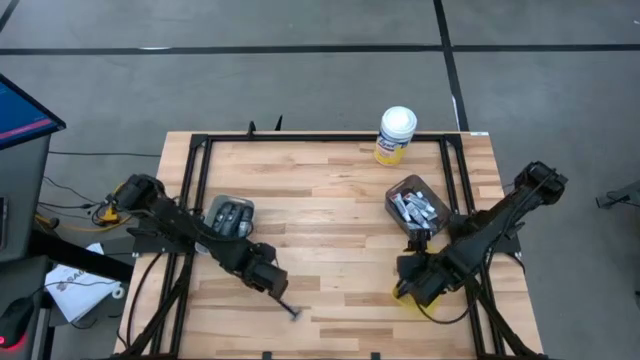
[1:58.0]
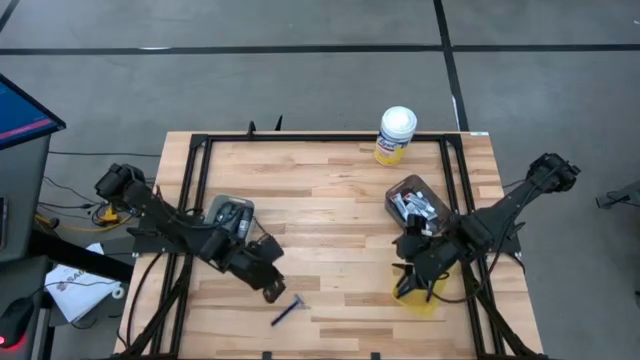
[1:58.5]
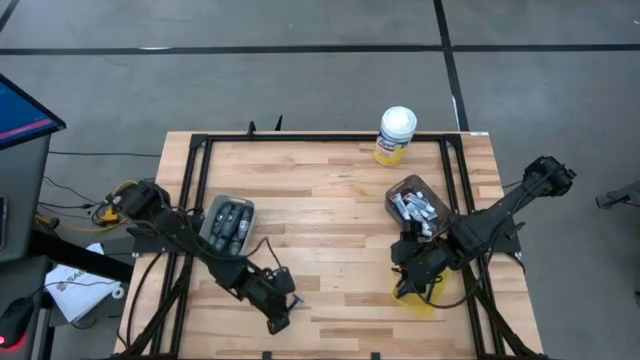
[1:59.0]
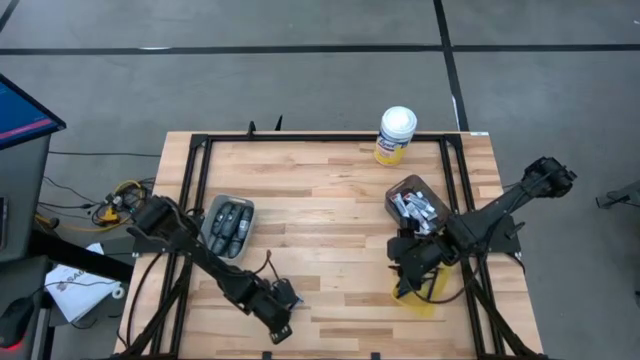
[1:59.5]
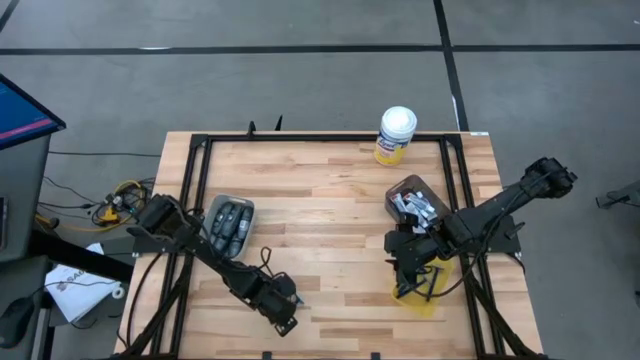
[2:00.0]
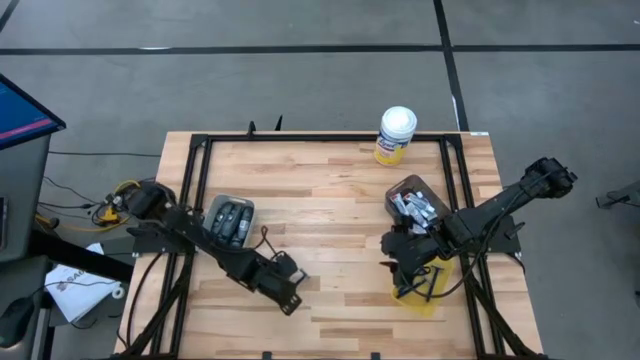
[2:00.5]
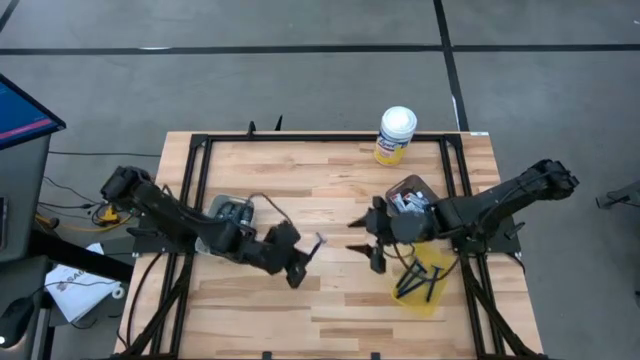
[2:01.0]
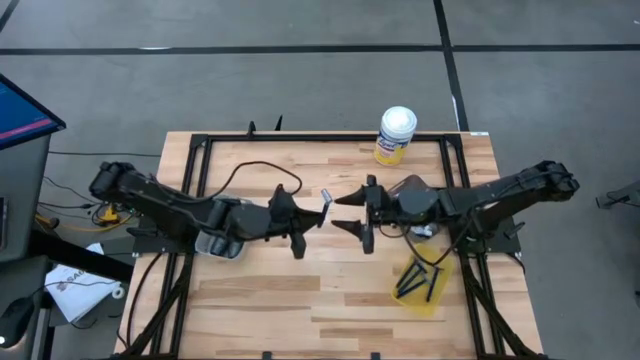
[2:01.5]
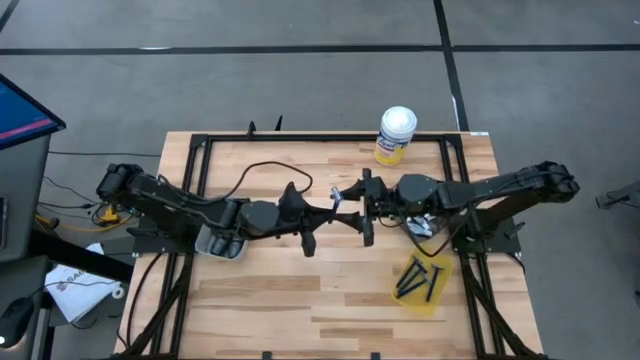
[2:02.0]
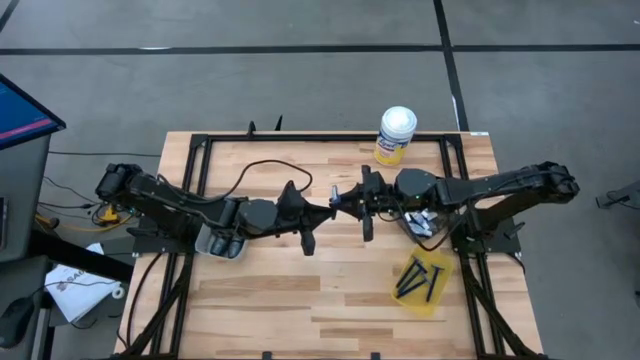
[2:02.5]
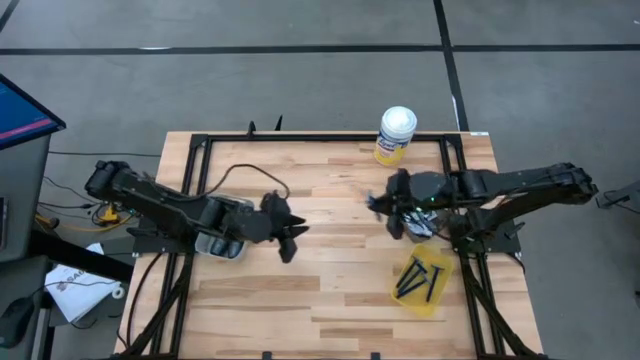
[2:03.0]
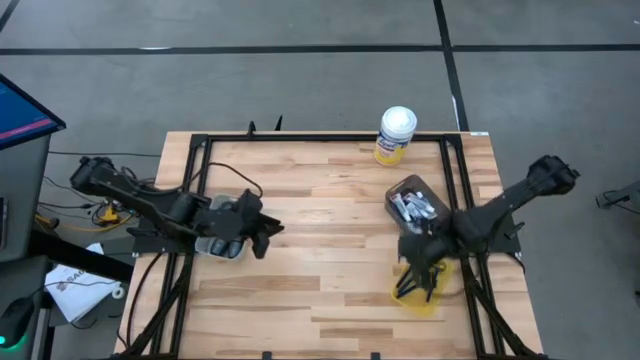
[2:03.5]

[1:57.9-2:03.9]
Task: Pick & Place Travel size toiletries
Put the blue razor into the yellow bin

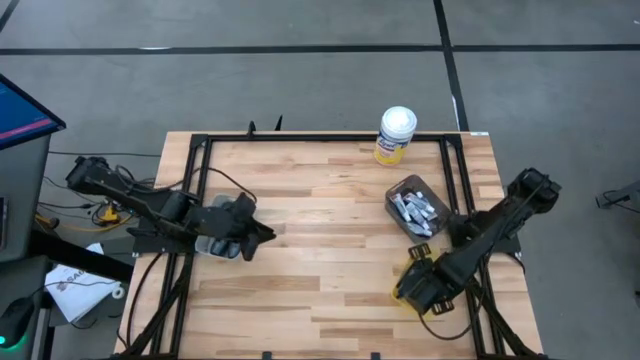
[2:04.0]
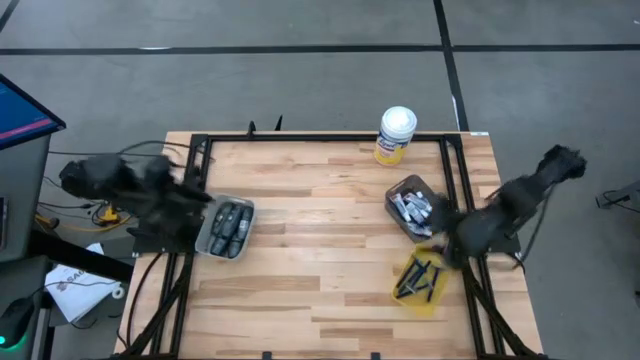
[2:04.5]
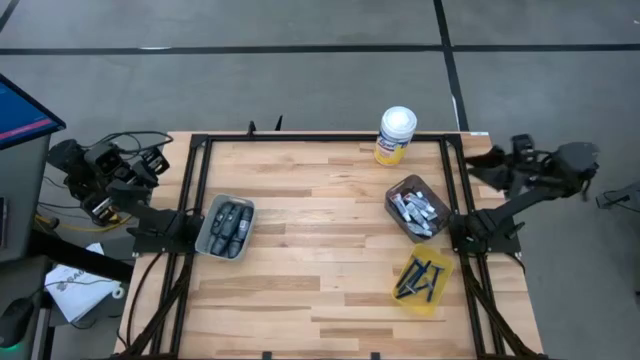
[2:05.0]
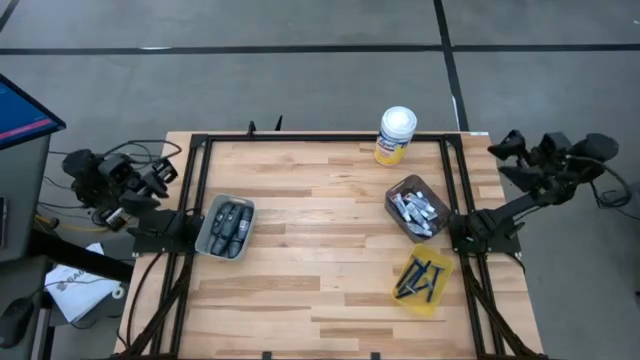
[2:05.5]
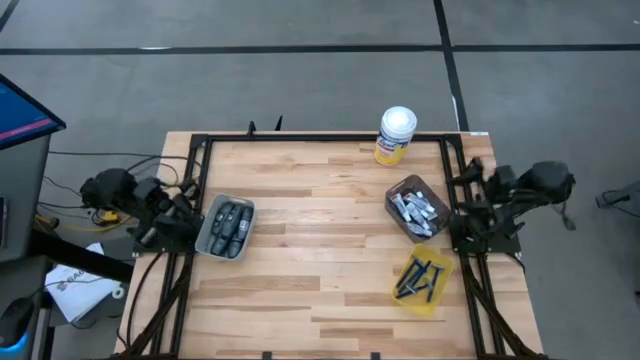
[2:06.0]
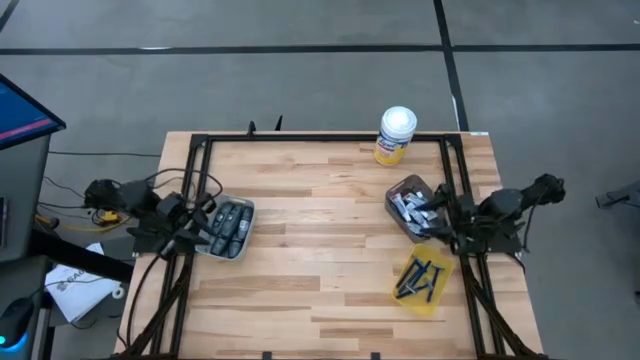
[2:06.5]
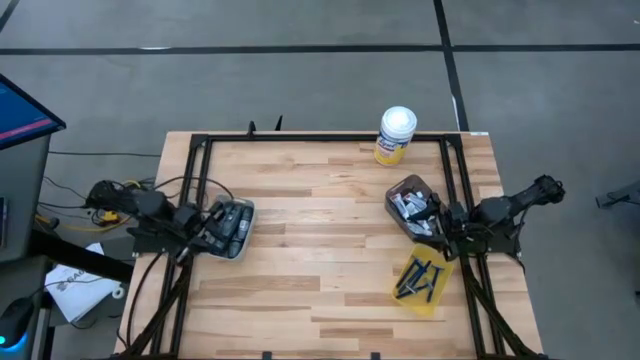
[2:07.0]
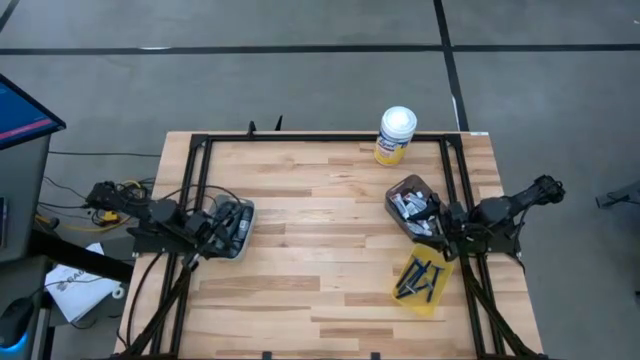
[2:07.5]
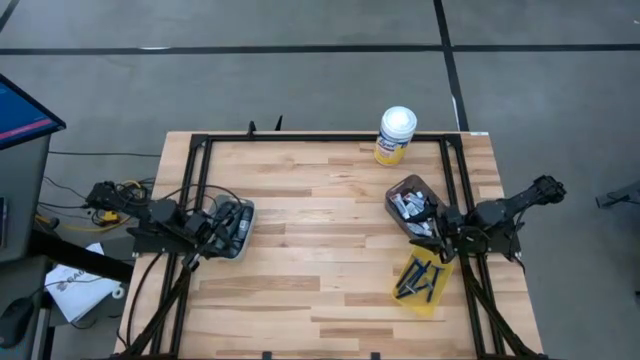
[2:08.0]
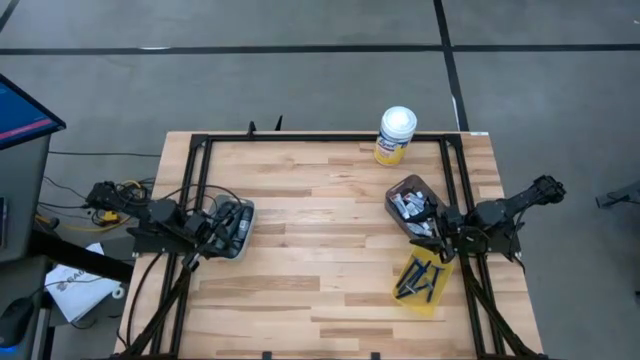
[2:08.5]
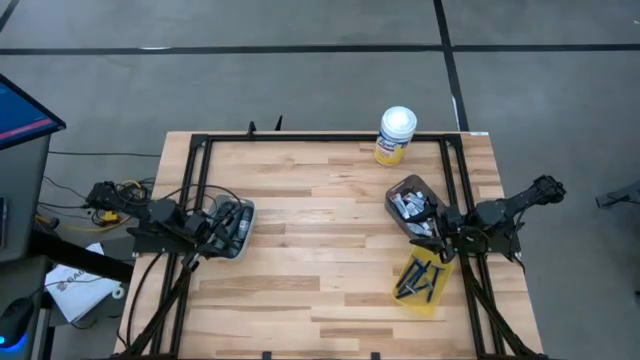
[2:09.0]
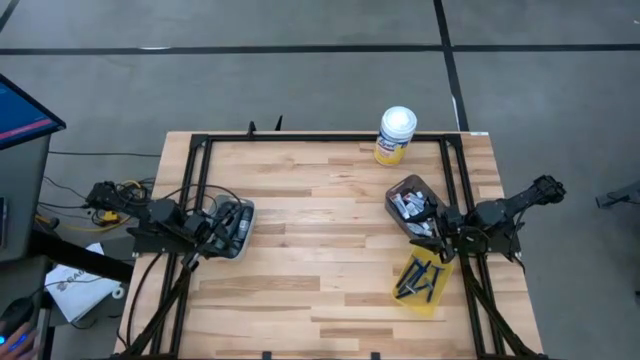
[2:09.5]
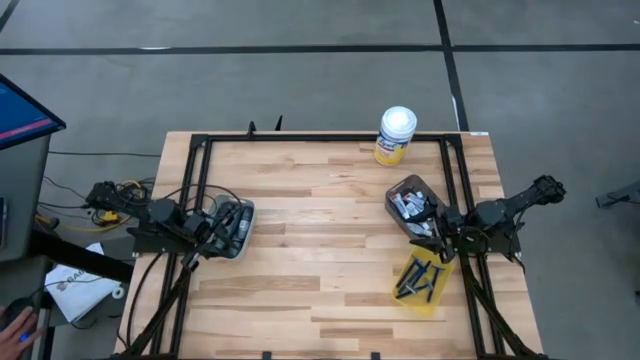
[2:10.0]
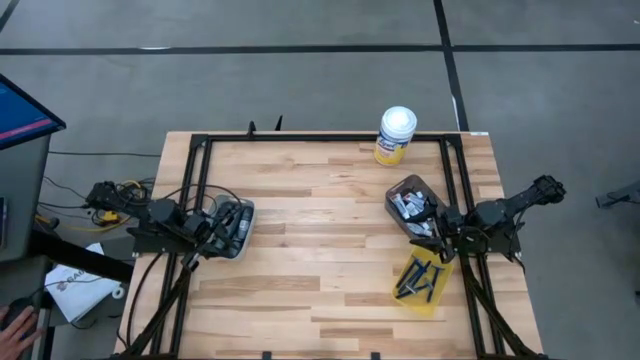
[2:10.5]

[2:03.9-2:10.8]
Return to Home Position

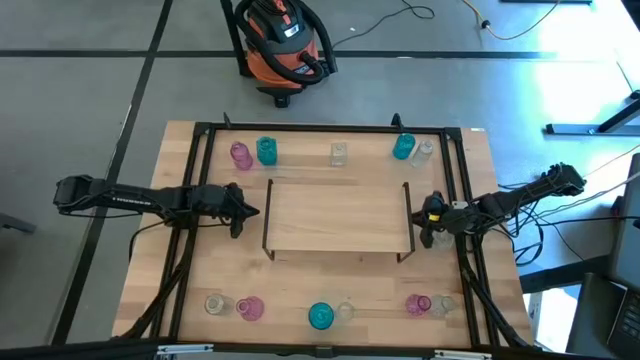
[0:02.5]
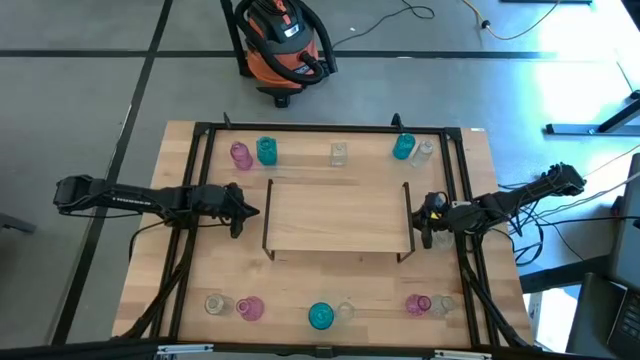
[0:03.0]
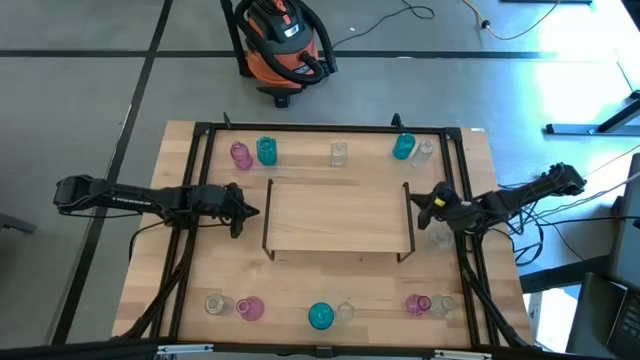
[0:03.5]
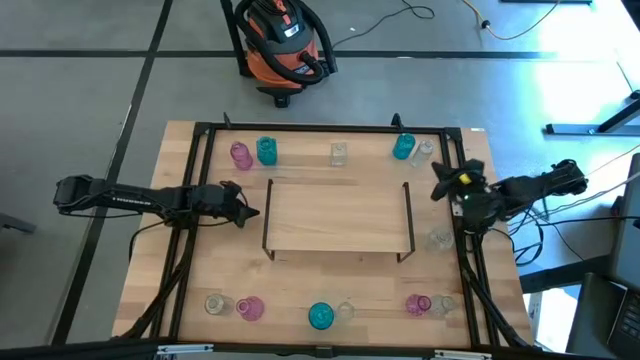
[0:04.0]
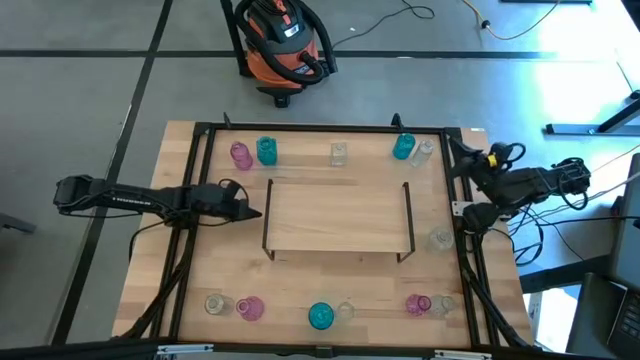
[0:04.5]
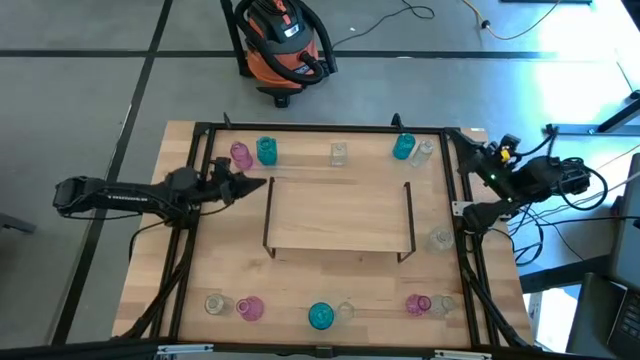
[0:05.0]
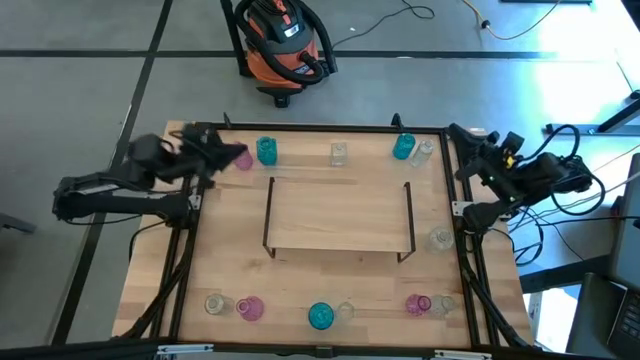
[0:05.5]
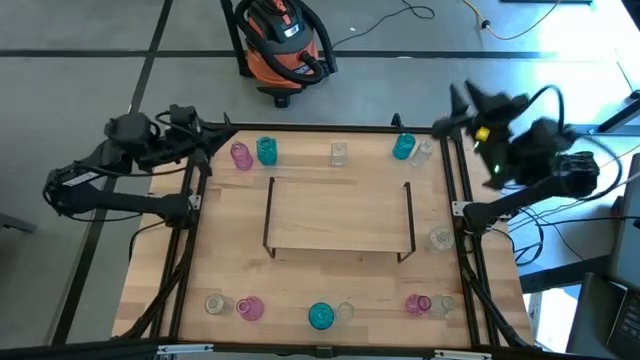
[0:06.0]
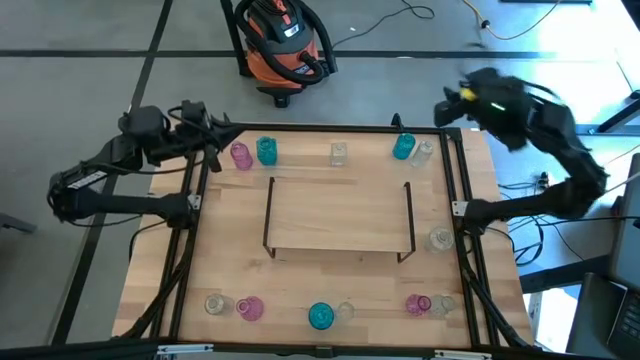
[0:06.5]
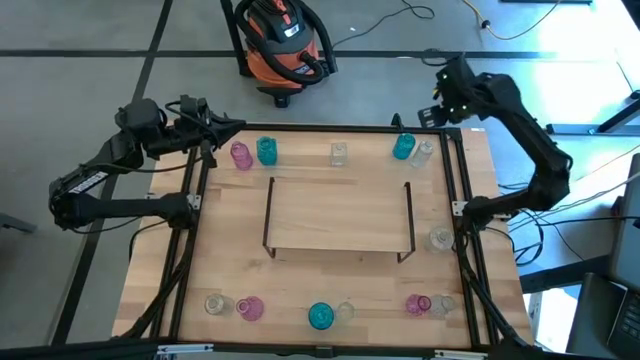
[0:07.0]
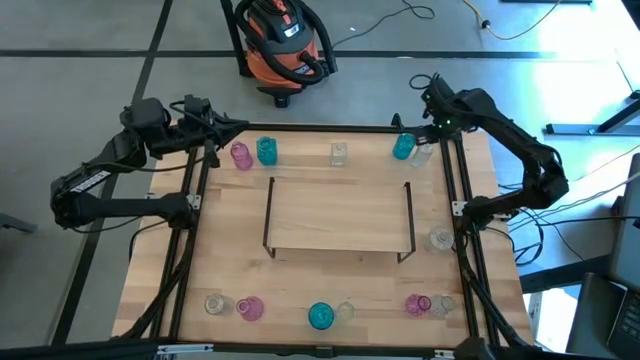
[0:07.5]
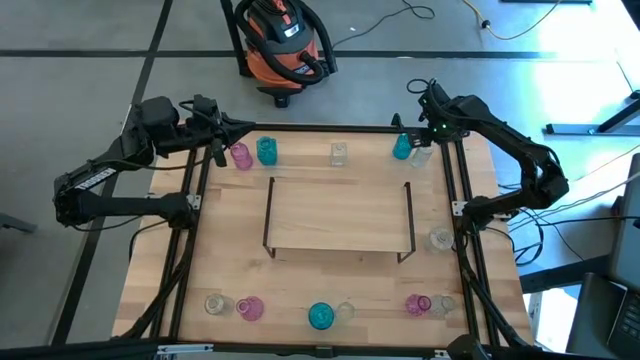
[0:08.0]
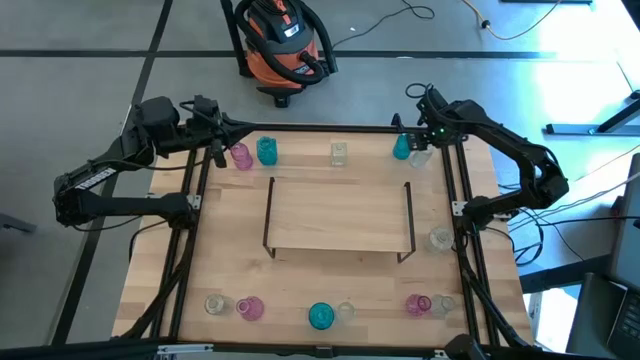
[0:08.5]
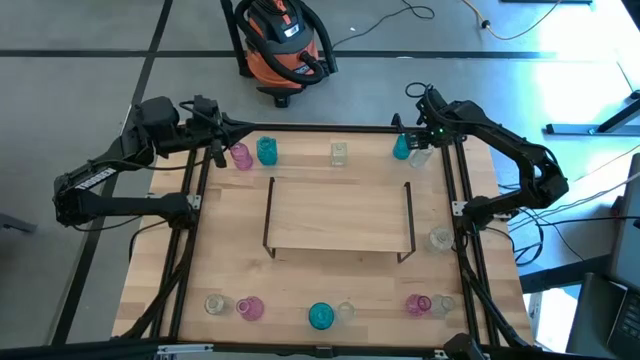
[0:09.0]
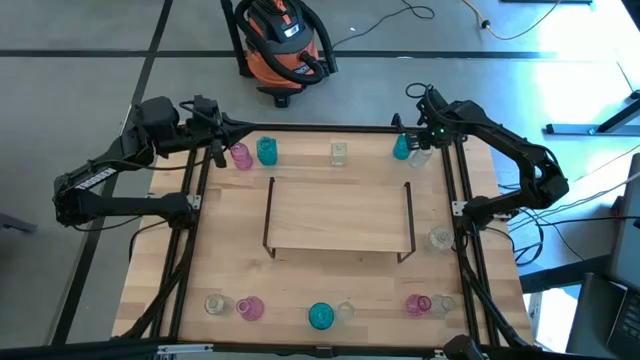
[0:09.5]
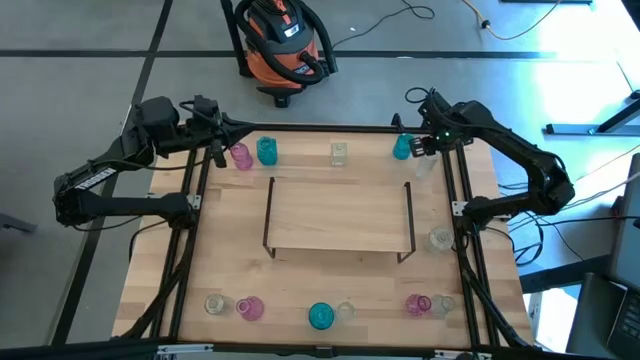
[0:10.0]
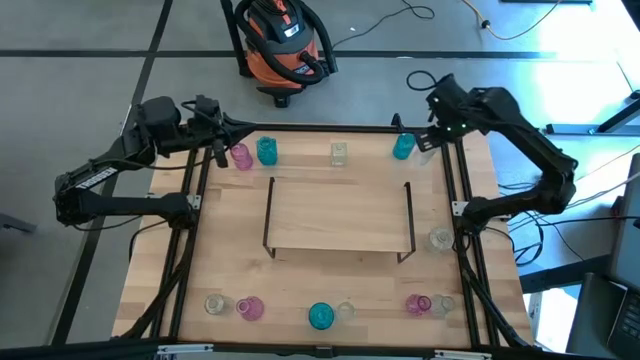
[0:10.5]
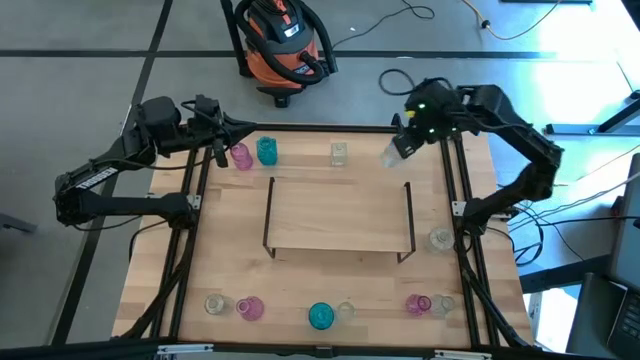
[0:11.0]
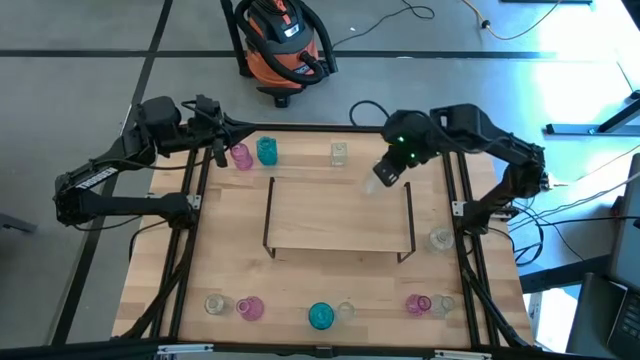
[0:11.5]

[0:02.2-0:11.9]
Task: sort vases onto shelf
Put the transparent vase on the shelf
